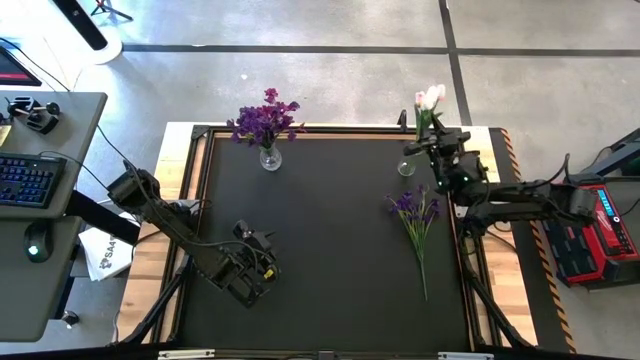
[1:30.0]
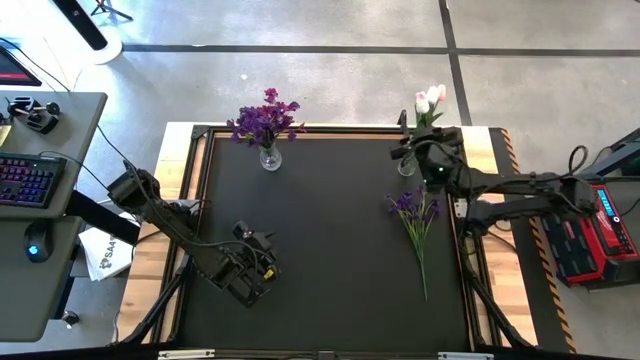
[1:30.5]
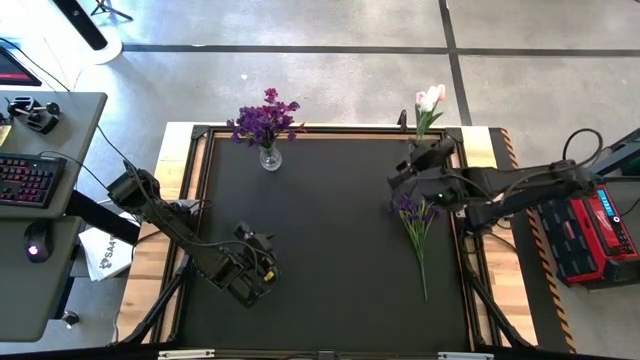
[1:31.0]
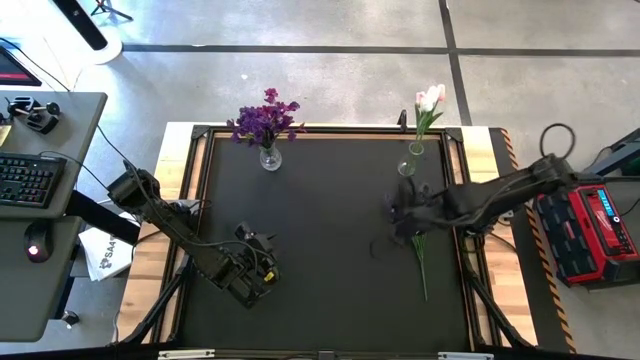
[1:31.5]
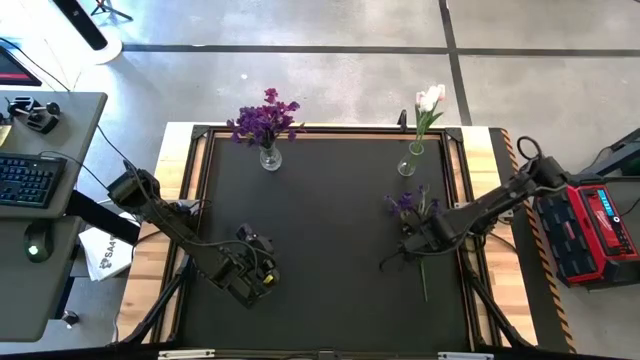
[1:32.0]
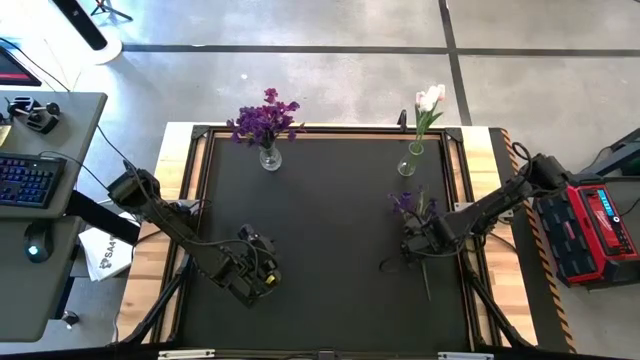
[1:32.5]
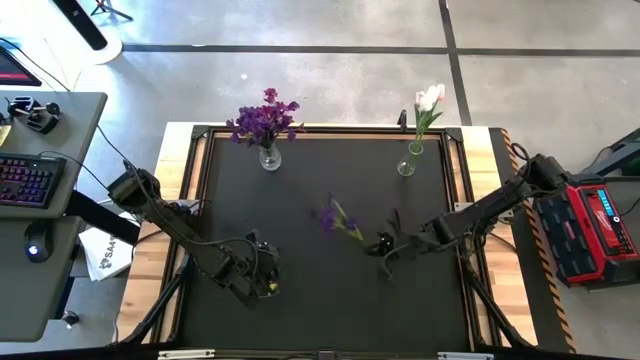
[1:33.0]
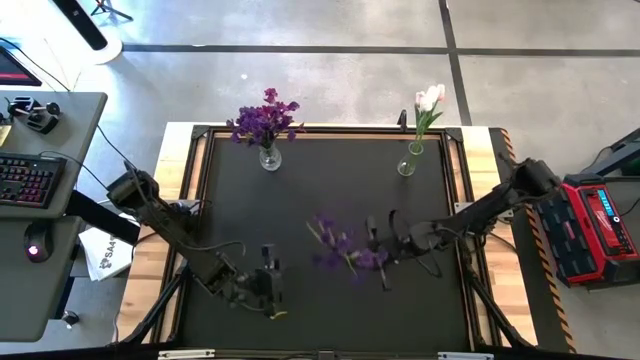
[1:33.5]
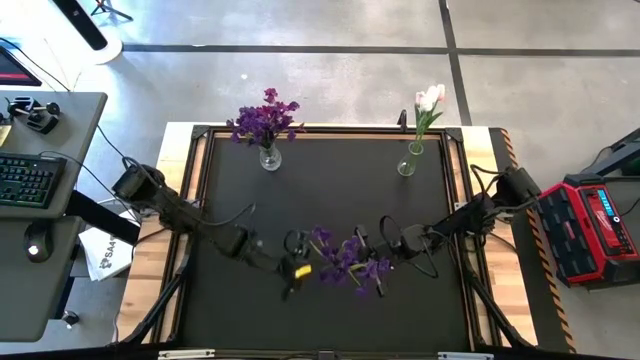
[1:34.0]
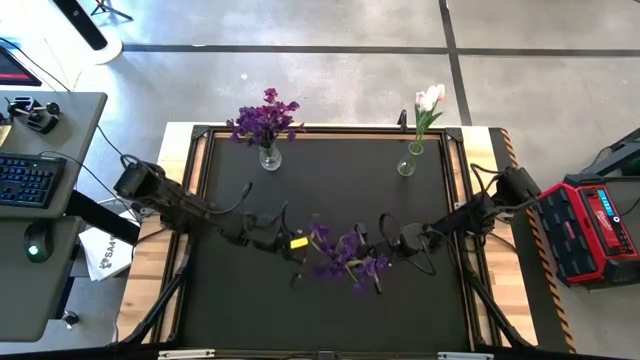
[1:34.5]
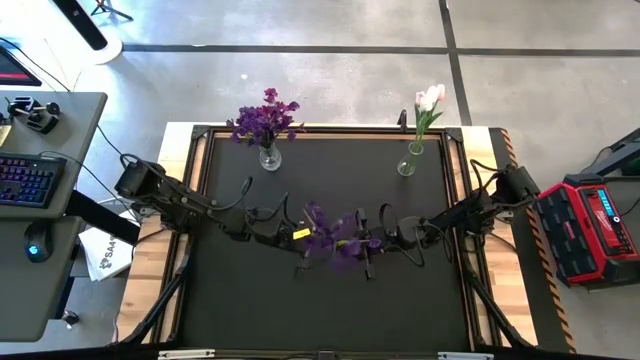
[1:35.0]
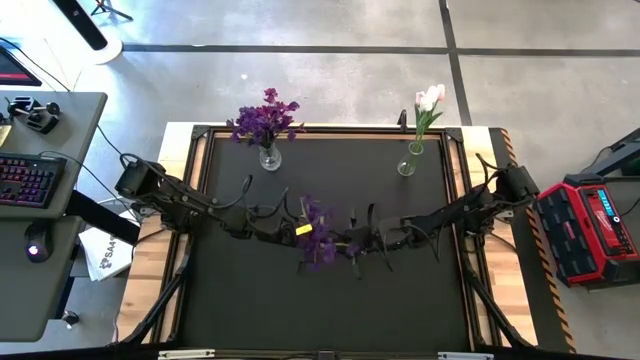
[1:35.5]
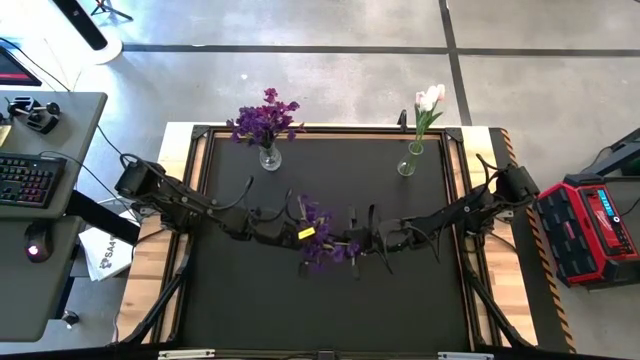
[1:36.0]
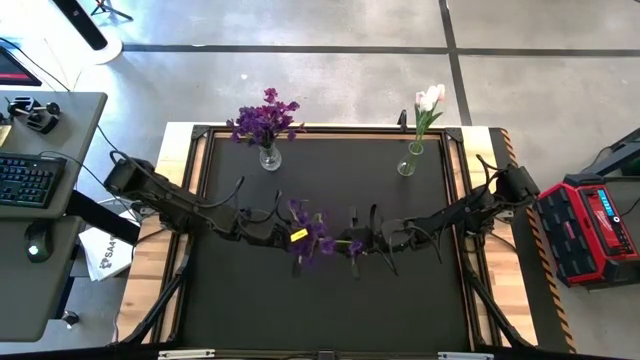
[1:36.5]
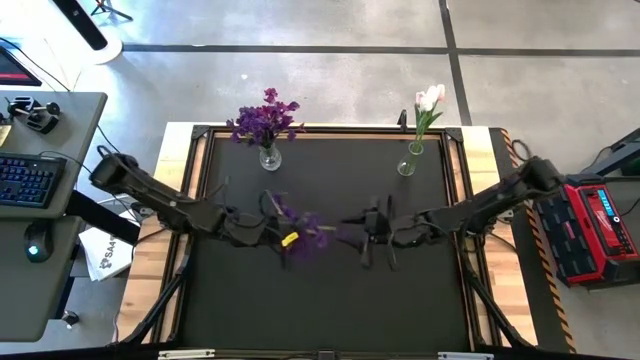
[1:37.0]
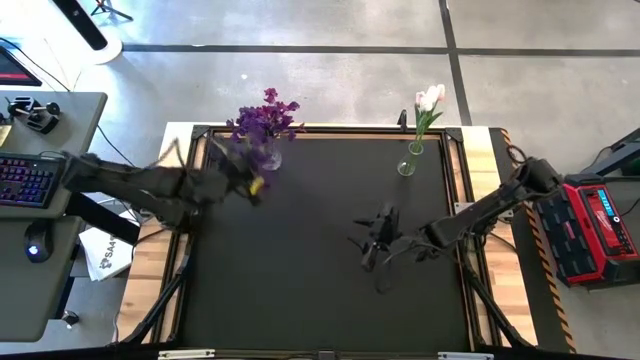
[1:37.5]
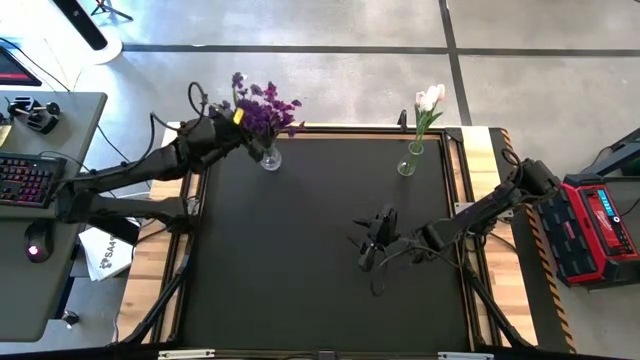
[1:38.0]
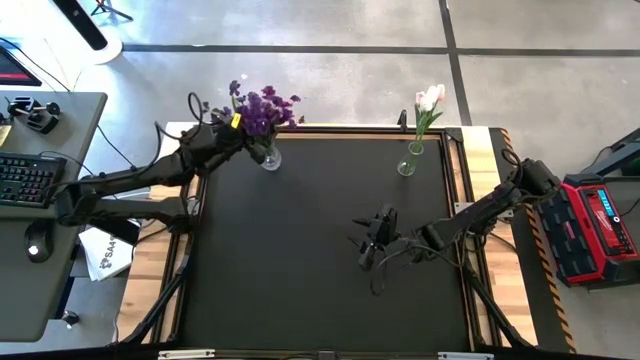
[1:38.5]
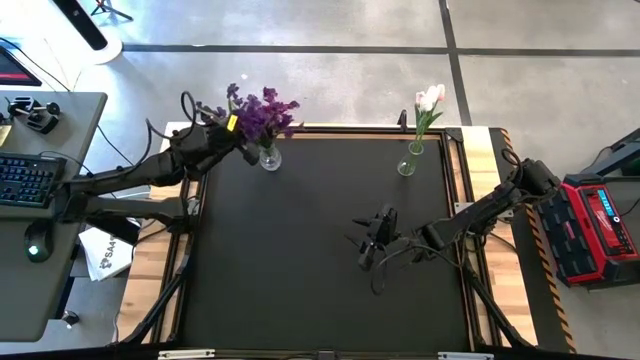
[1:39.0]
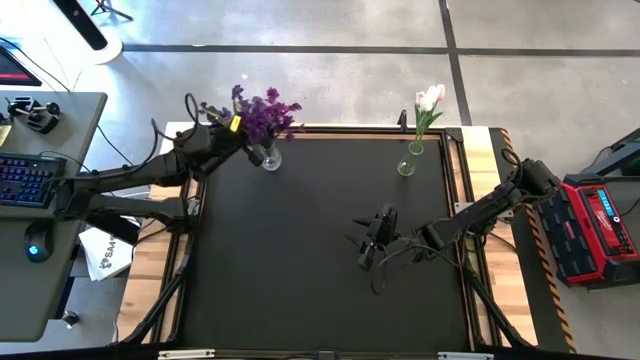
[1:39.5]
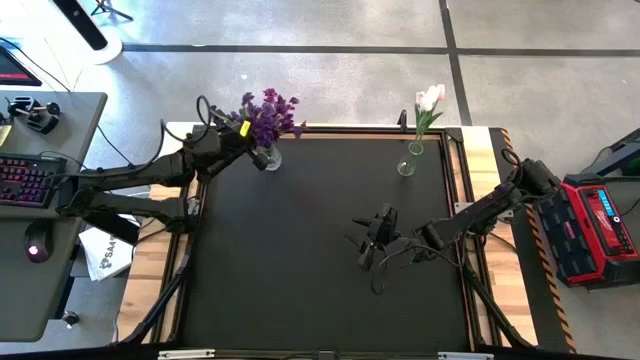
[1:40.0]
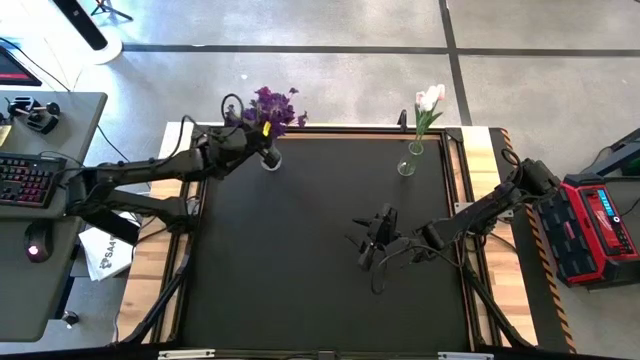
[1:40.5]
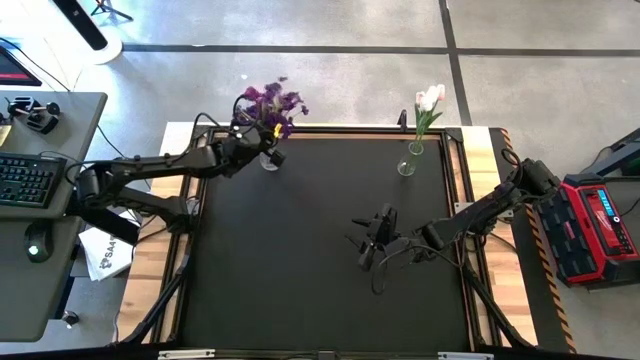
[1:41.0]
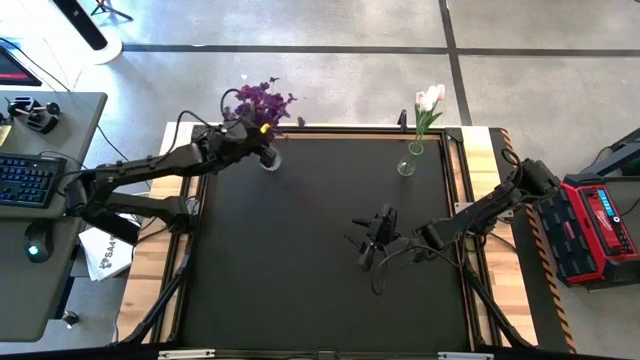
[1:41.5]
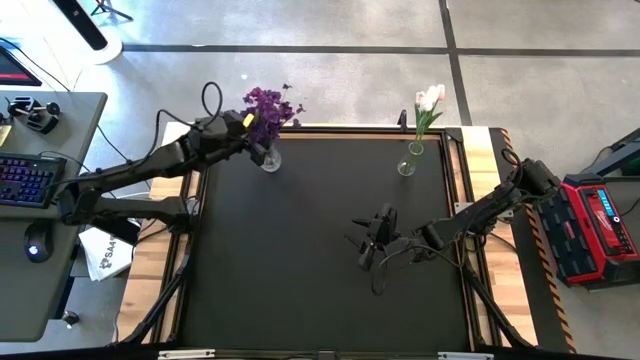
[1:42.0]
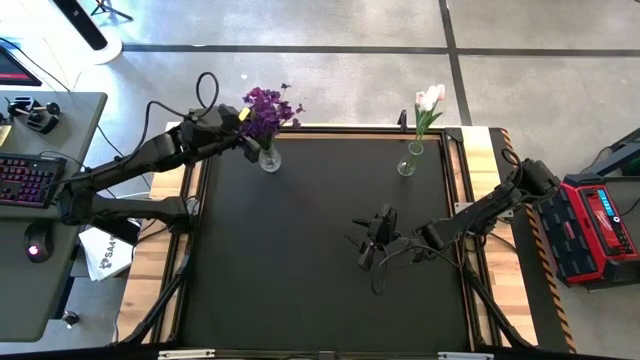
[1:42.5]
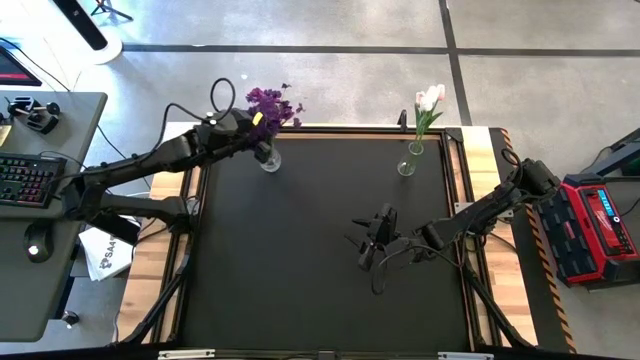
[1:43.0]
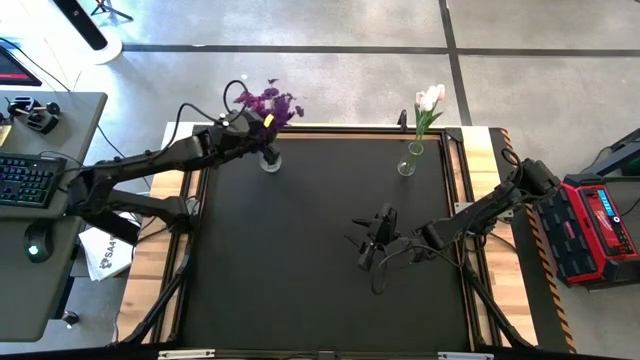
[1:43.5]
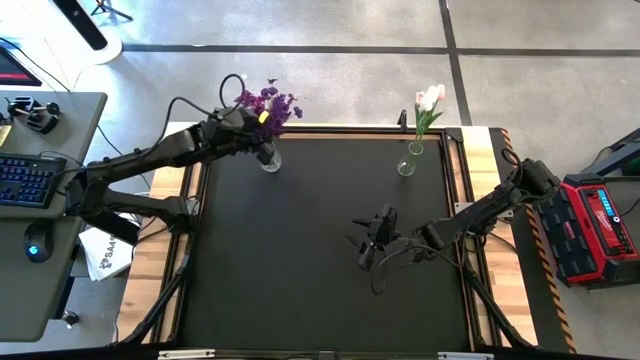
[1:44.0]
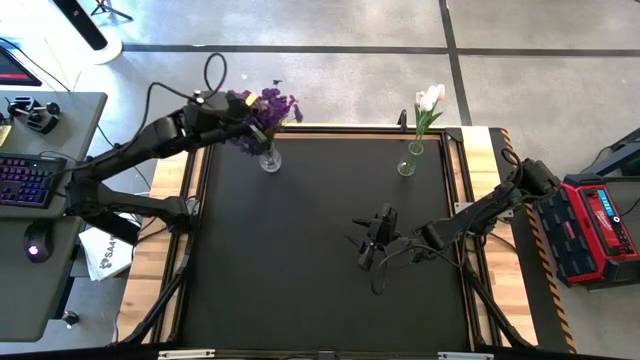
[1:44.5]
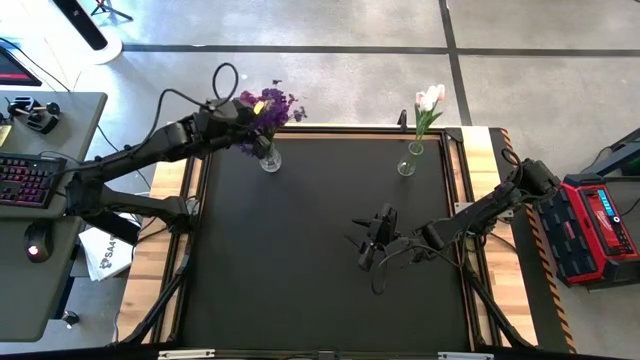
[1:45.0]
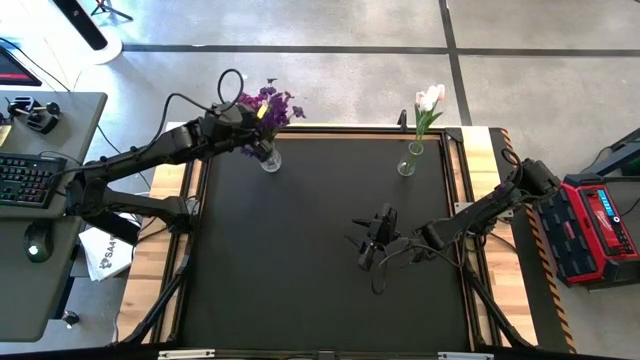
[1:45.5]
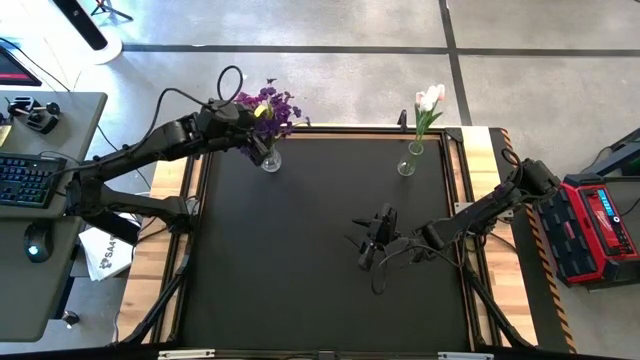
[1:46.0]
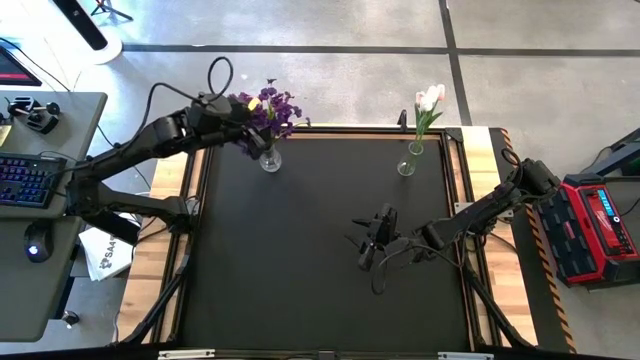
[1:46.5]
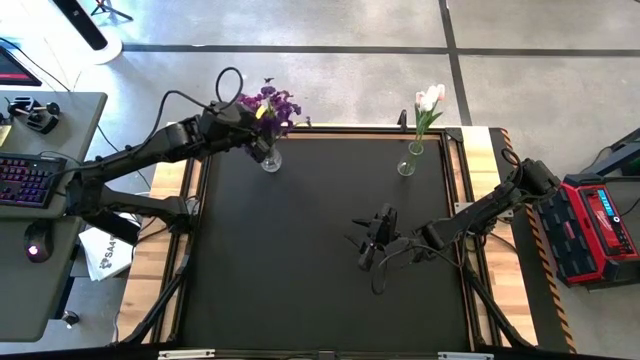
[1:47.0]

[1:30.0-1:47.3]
Task: Sort flowers into vase by color
Put the violet flowers into the left transparent vase

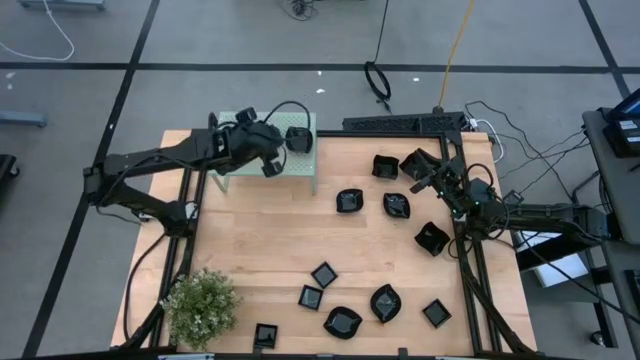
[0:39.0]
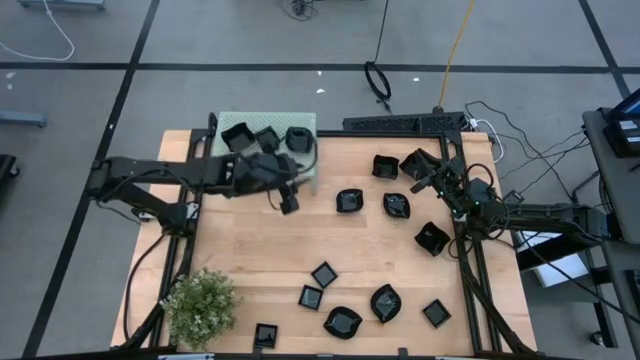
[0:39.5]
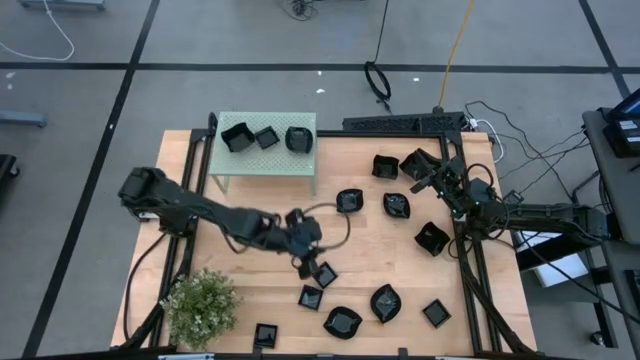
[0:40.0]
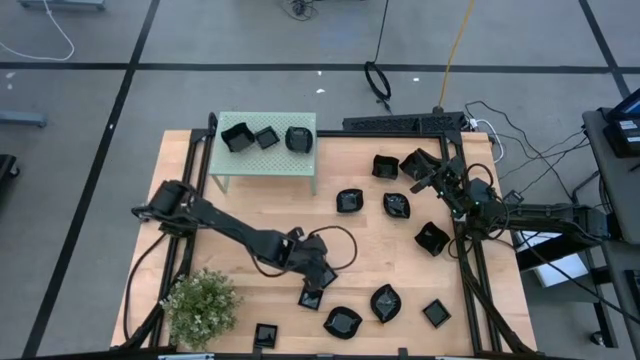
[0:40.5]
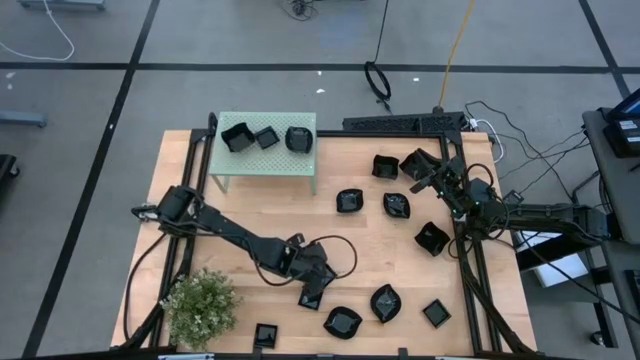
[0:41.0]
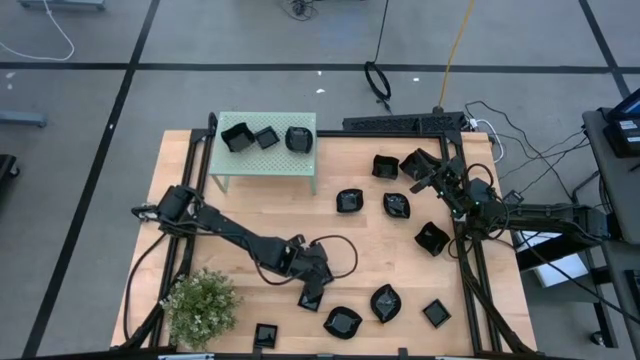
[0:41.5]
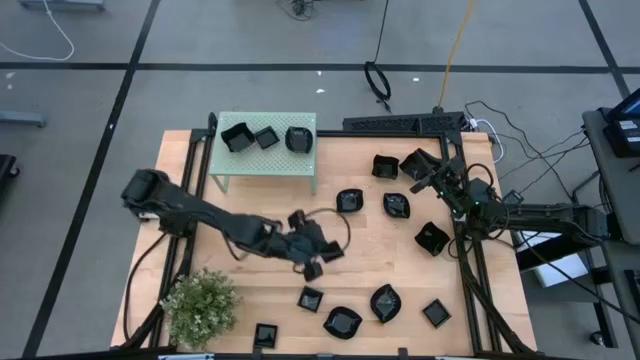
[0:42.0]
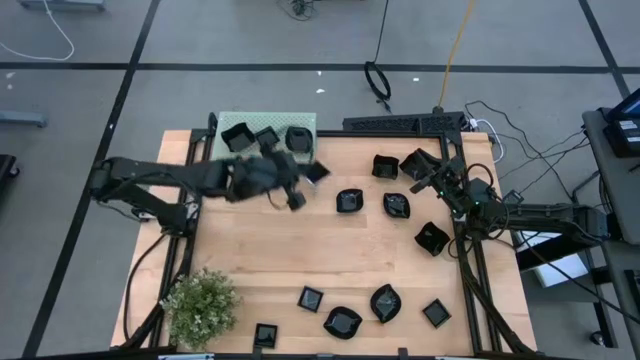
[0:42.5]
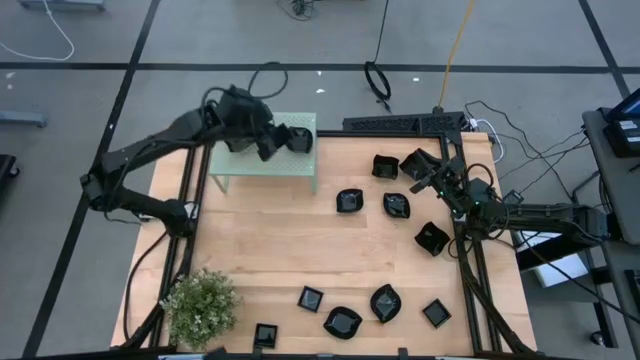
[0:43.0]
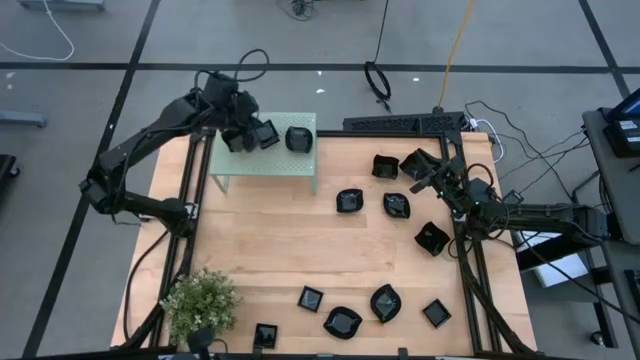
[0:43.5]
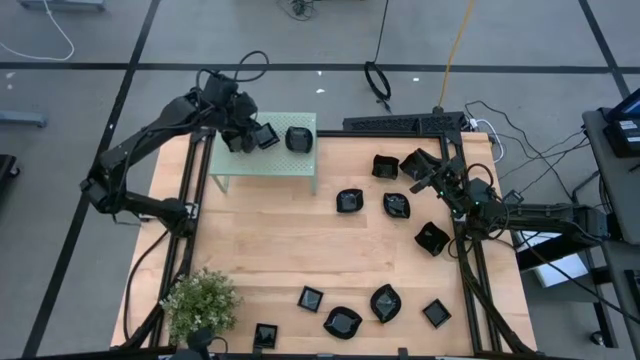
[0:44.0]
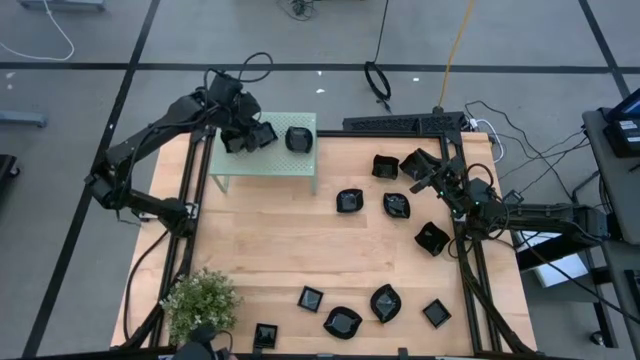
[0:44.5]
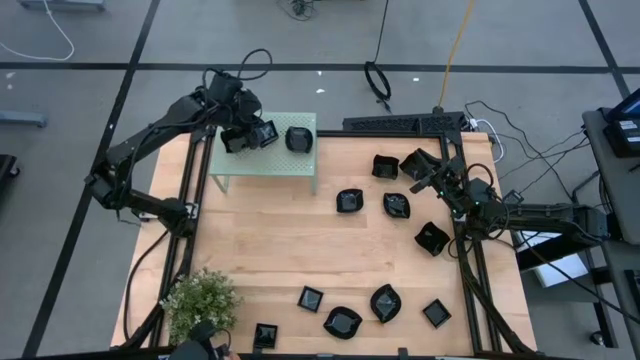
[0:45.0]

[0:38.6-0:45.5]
Task: Pick & Place Mini shaped plates
Stack the square plate on top of the square plate on the shelf
